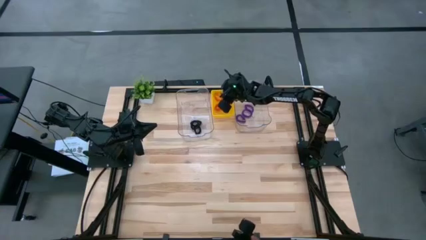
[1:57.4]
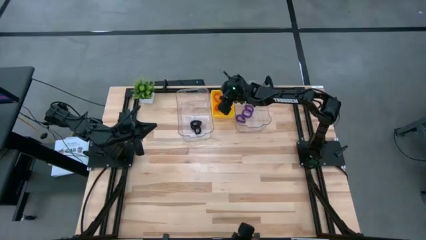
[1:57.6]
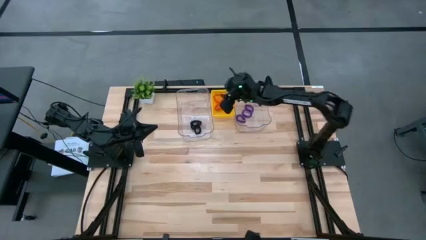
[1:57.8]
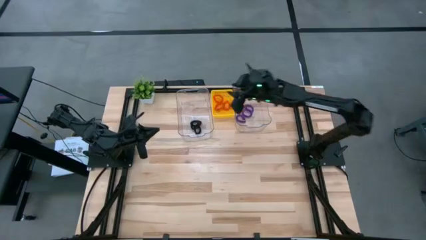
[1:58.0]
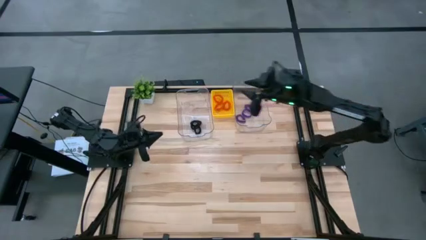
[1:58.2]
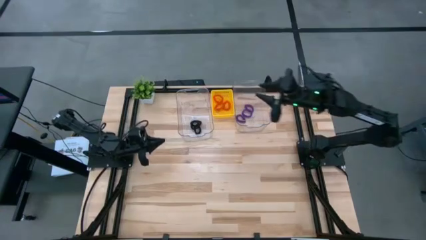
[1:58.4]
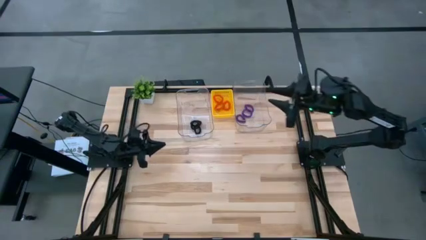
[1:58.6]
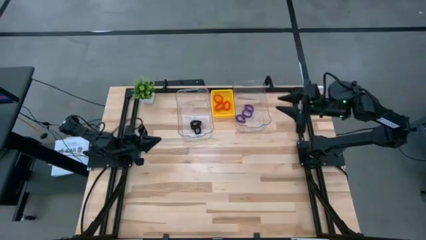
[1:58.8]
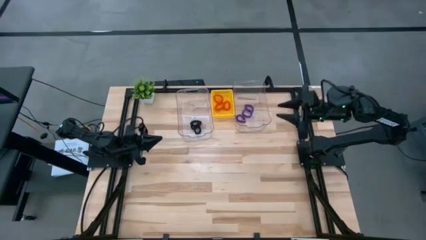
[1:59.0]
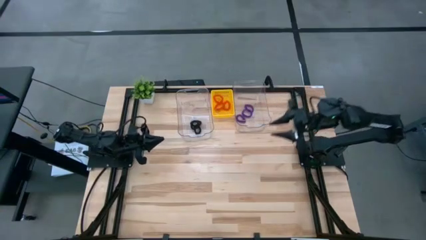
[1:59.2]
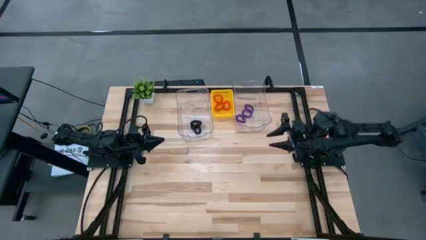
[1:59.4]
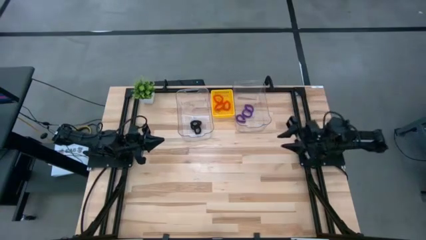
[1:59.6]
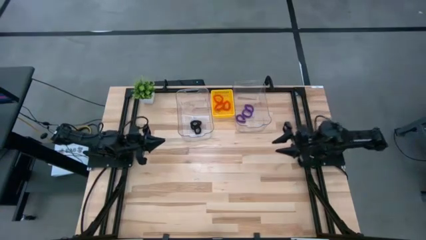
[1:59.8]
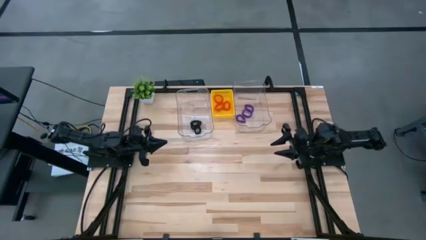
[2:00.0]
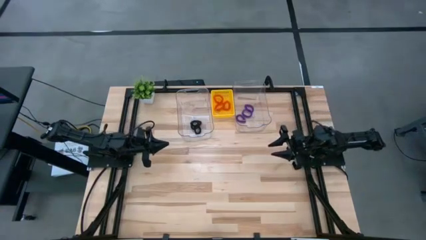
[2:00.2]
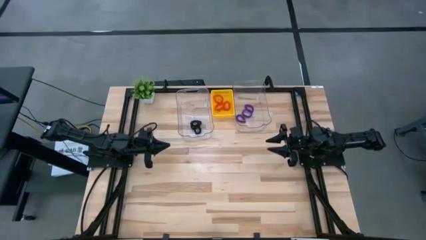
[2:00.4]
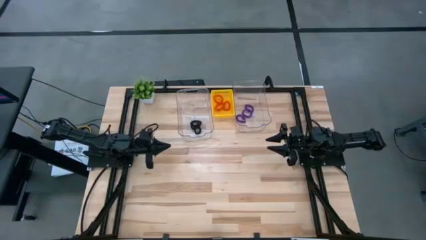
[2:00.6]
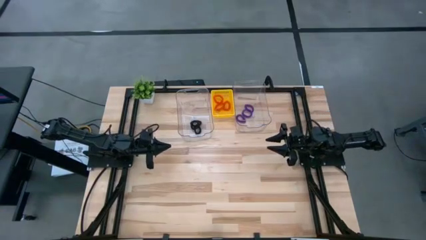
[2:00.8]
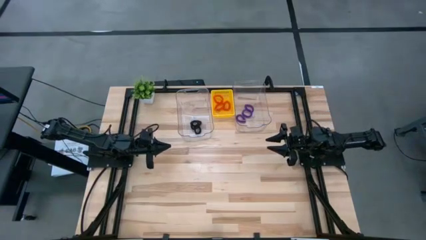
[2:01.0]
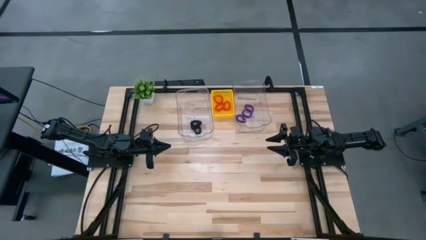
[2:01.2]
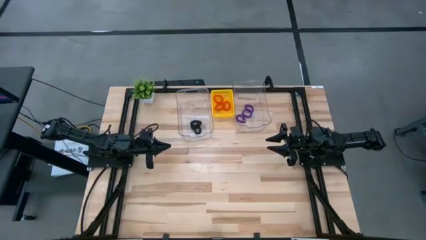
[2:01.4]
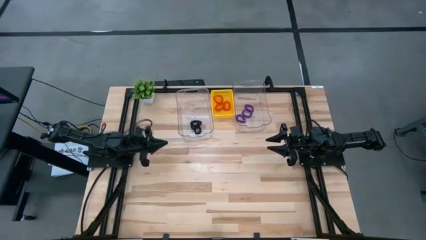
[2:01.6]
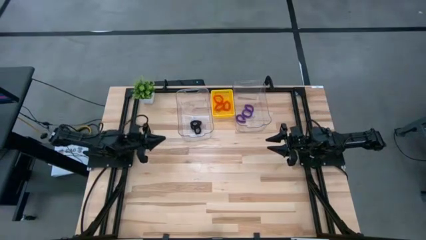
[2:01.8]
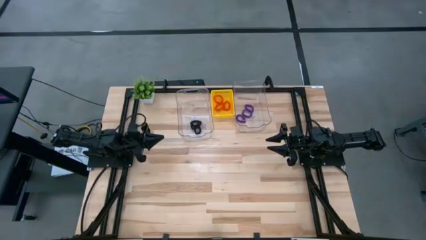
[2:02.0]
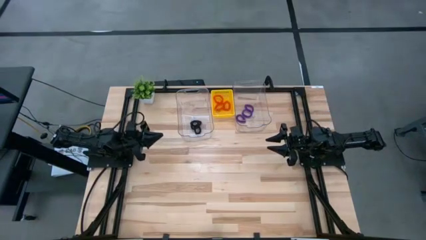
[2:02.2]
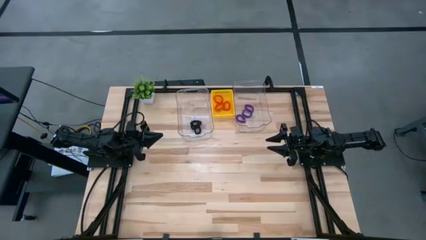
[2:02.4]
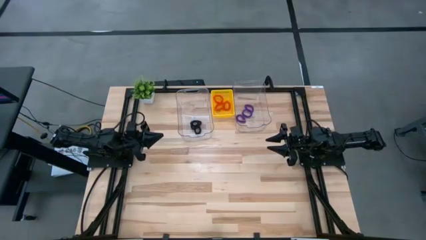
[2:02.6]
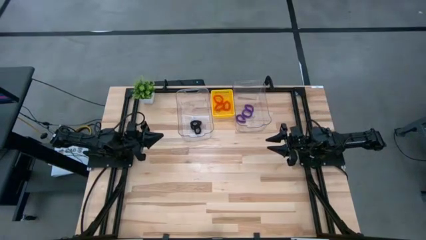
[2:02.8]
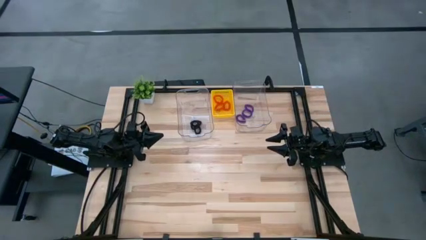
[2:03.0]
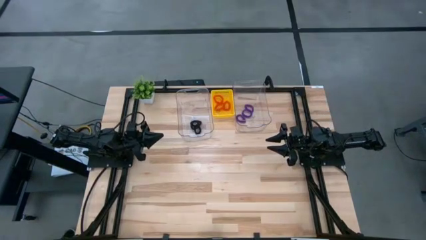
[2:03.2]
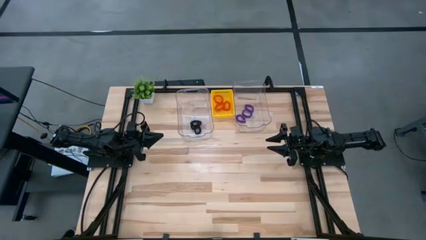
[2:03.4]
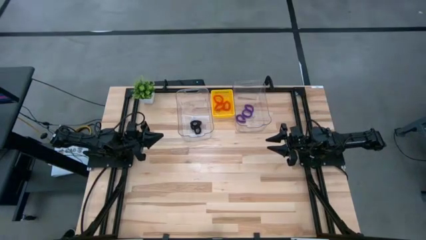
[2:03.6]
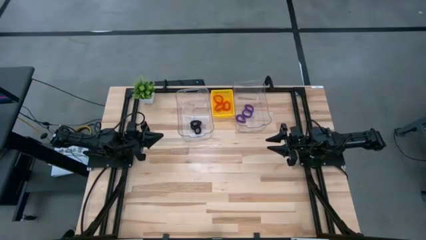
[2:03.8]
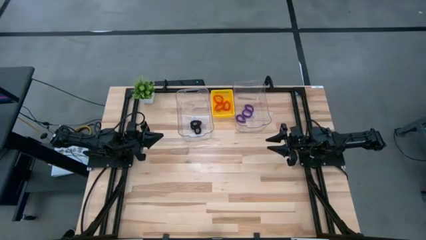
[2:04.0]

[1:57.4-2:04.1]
Task: Sort spring keychains
Return to Home Position

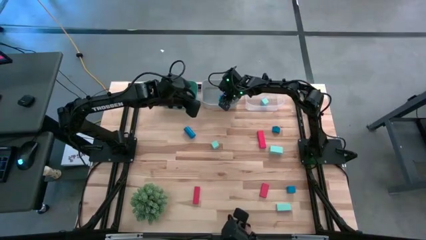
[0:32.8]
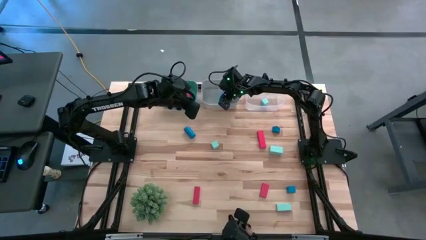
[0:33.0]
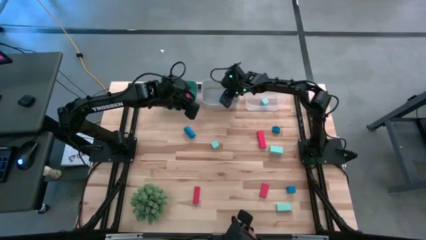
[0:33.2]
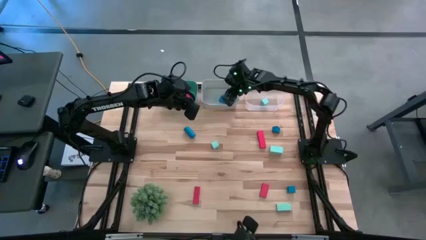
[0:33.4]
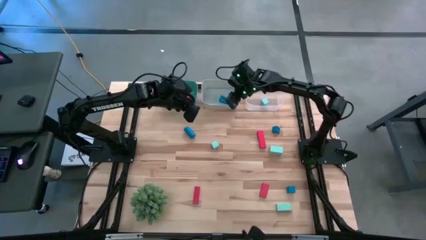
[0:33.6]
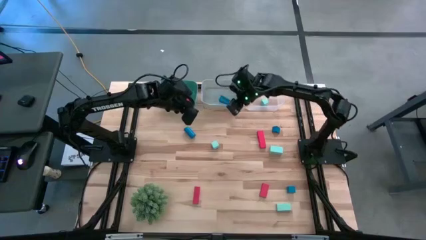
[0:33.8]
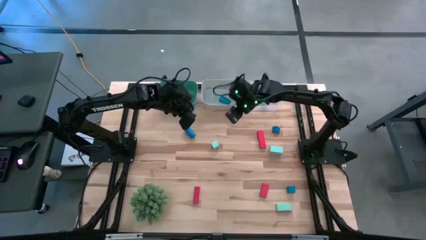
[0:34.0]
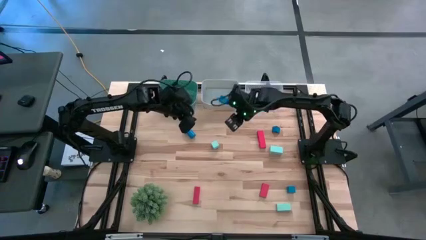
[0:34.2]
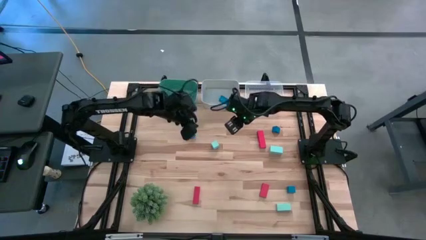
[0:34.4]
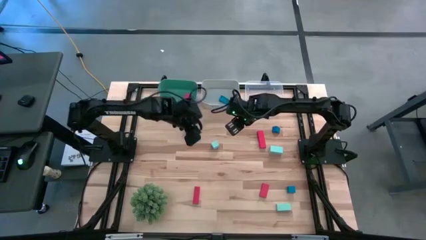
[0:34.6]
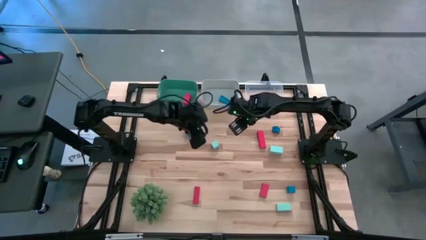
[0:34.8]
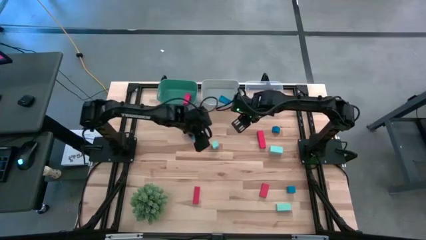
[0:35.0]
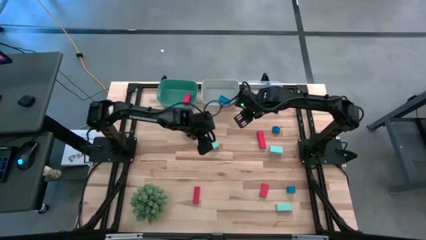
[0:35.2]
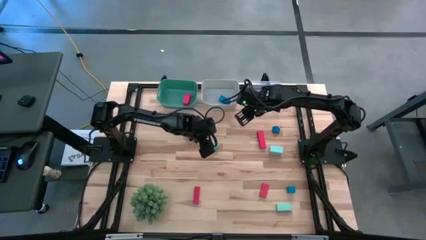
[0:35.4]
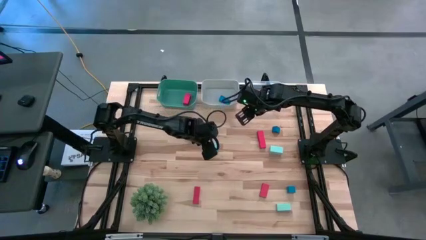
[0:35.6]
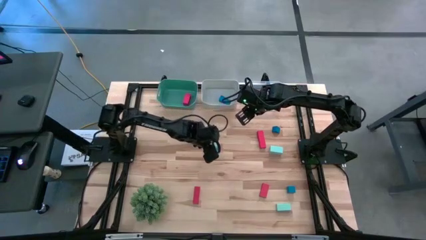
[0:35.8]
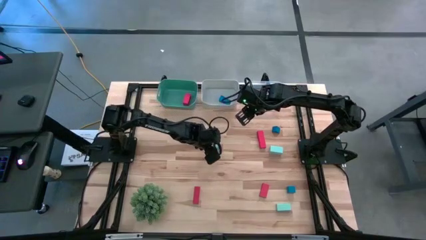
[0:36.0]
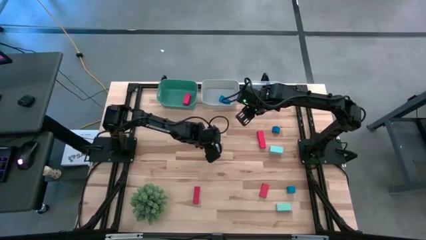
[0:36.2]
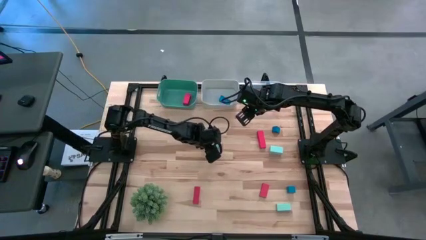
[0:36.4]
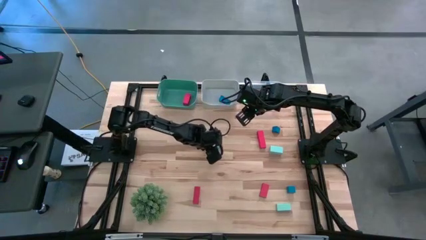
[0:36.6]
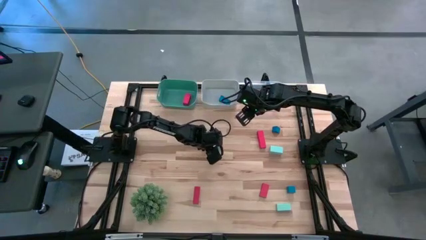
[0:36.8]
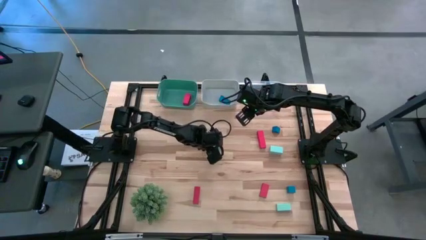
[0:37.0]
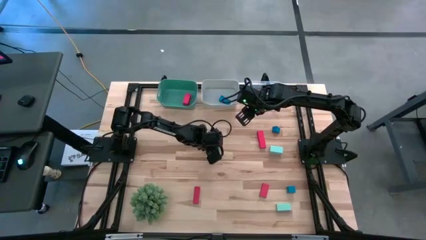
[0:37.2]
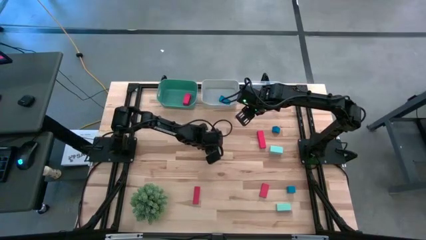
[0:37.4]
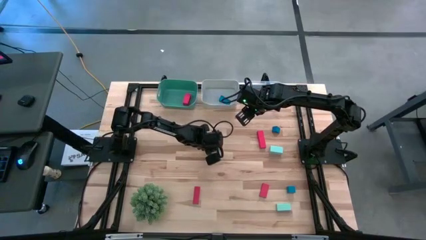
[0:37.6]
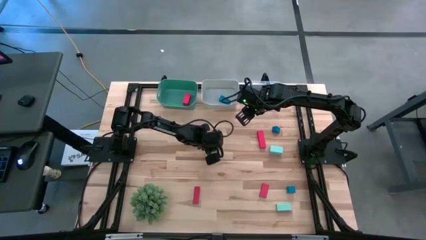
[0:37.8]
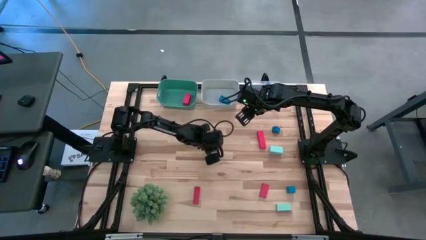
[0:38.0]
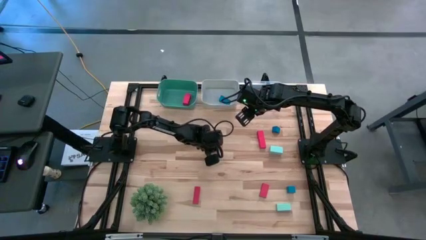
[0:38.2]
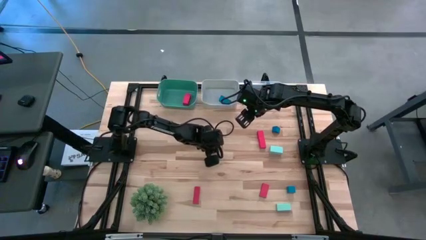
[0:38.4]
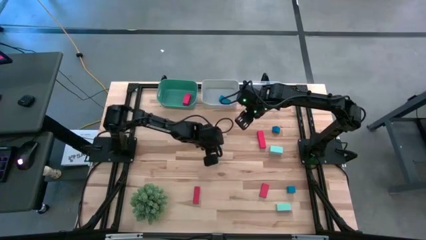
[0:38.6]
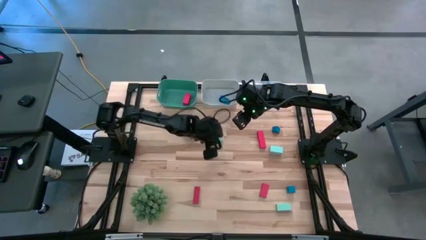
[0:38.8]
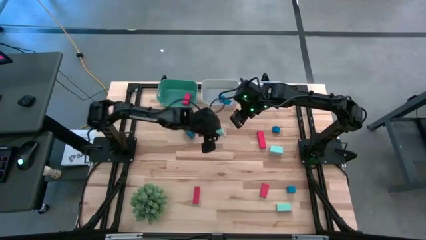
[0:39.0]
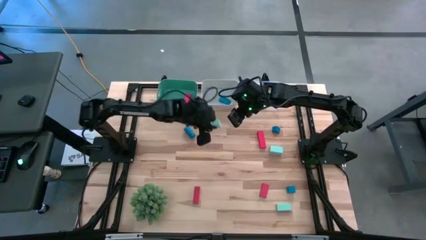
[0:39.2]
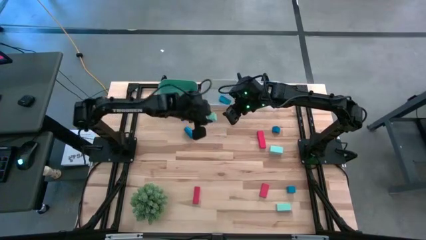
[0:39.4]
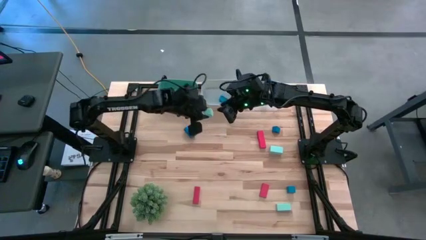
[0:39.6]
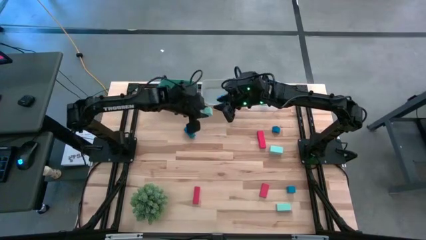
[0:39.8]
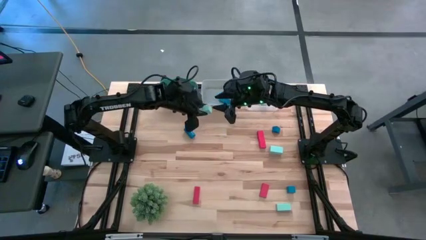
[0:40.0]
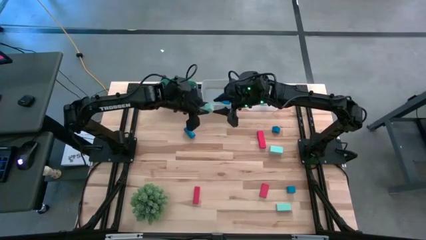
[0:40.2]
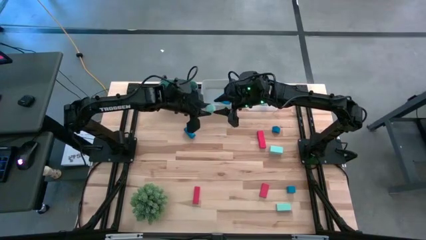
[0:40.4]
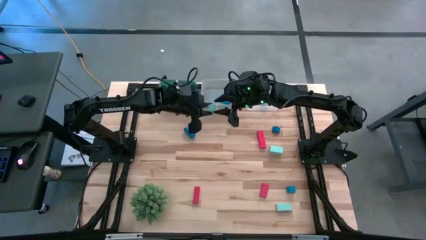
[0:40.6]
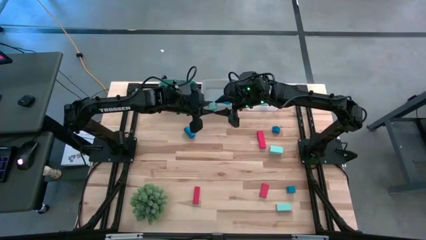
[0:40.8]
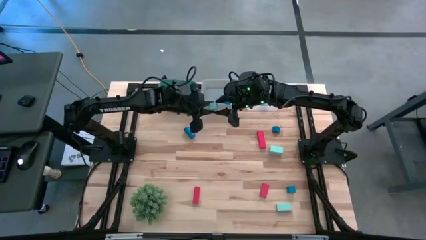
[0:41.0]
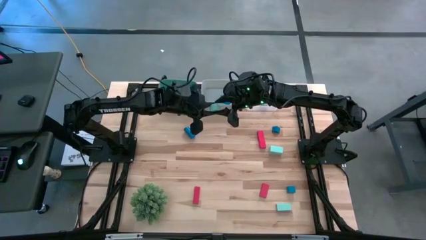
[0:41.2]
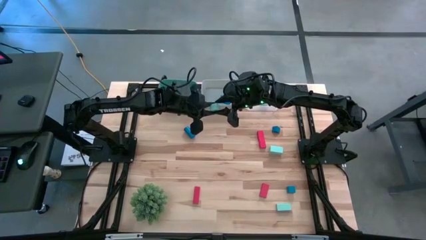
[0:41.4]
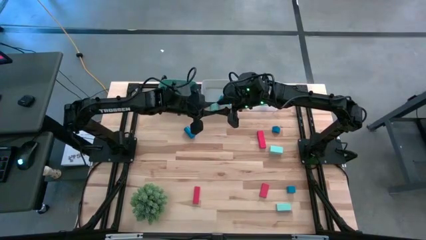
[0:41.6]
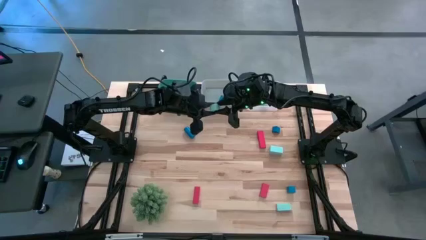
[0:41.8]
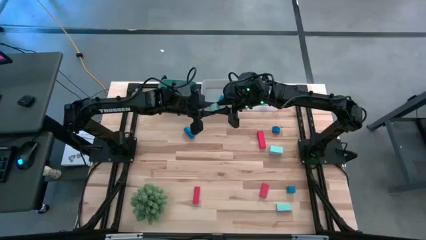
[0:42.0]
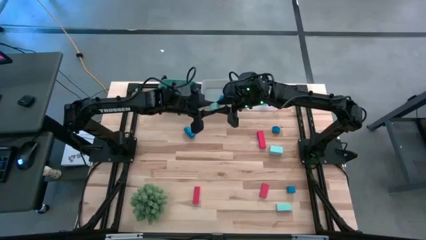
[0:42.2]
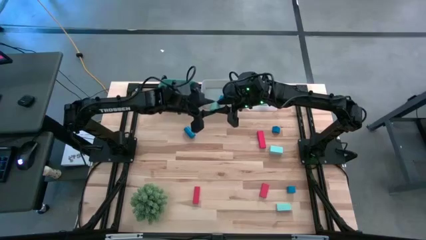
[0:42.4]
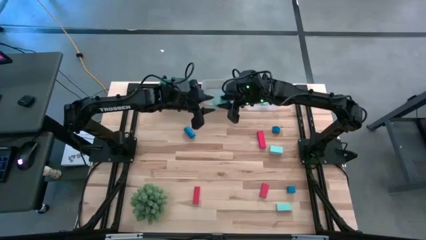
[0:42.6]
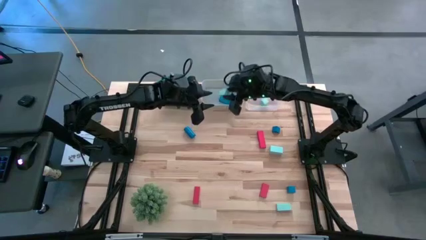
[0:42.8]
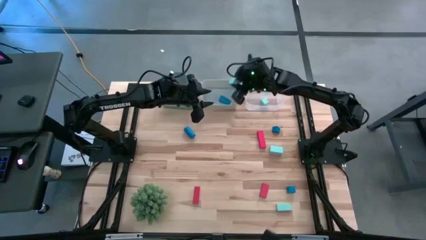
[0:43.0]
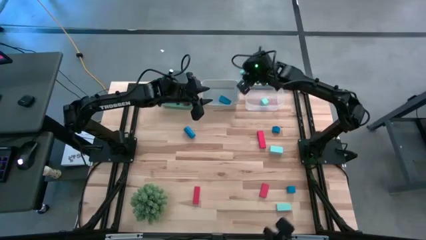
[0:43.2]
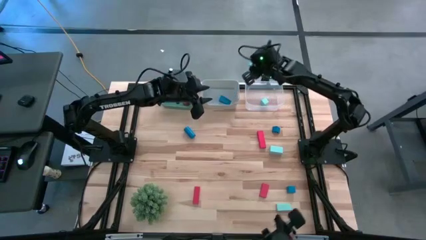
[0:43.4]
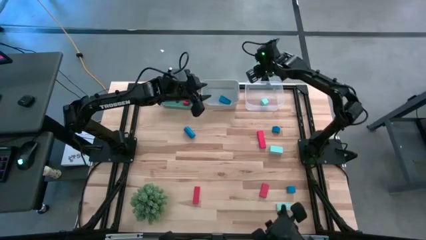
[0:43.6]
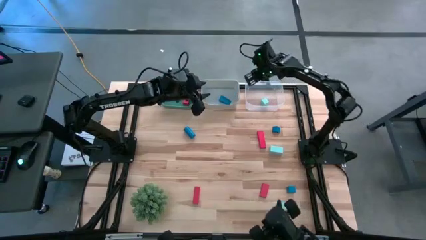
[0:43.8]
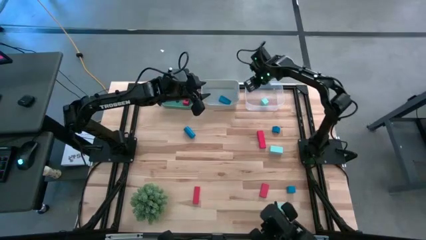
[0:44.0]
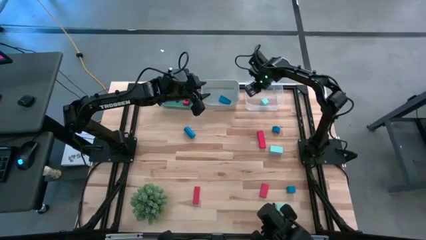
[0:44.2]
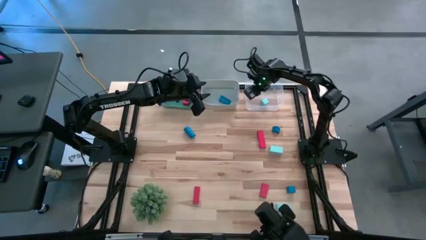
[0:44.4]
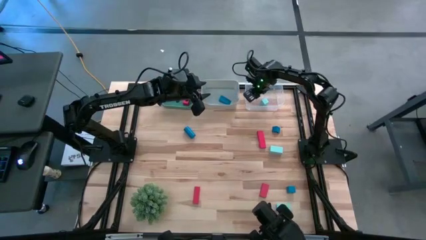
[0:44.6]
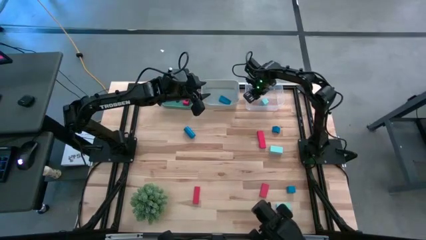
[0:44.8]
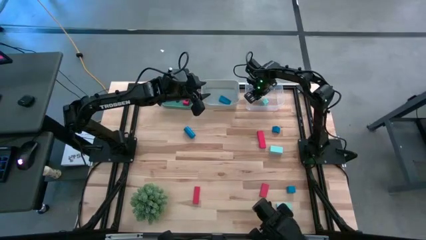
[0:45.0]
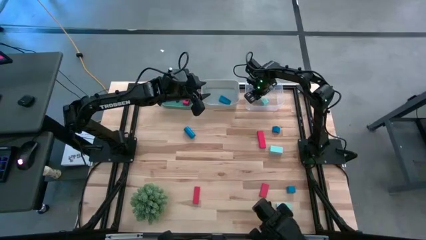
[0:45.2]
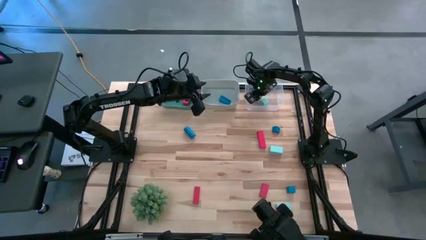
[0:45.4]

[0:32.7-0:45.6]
Task: Sort & place blocks by color
Put the light blue block into the transparent bin
